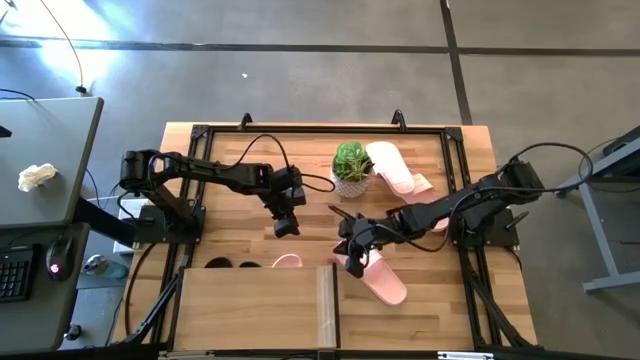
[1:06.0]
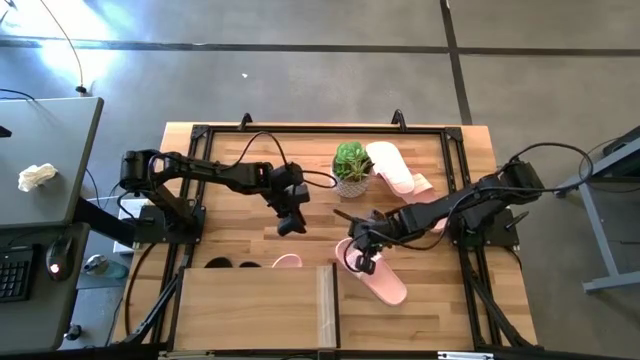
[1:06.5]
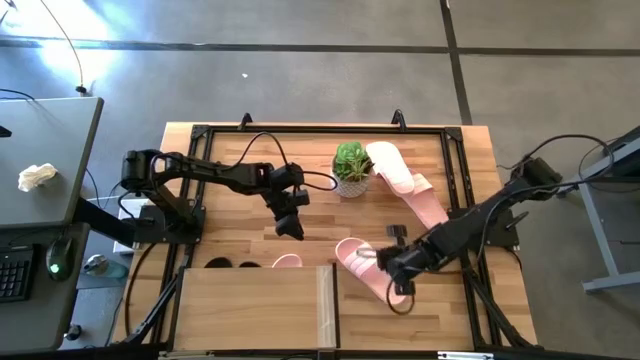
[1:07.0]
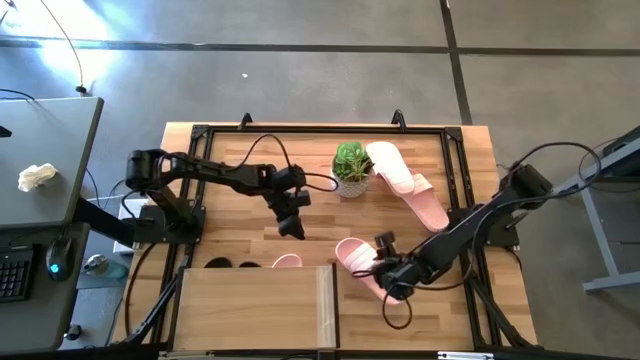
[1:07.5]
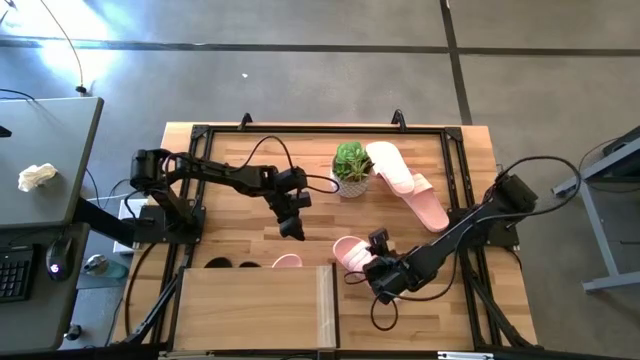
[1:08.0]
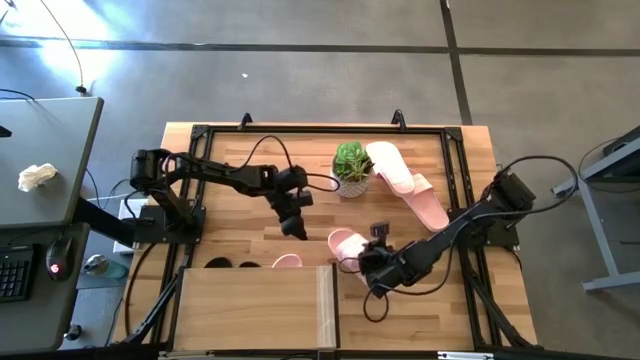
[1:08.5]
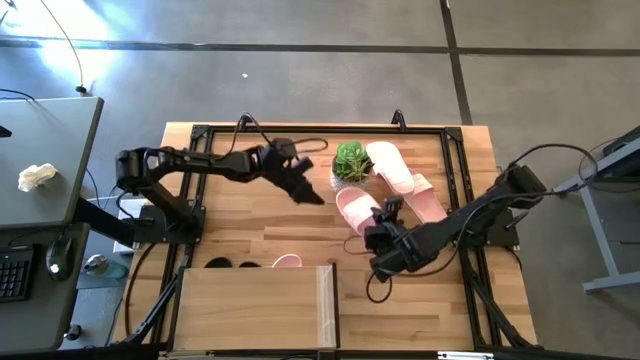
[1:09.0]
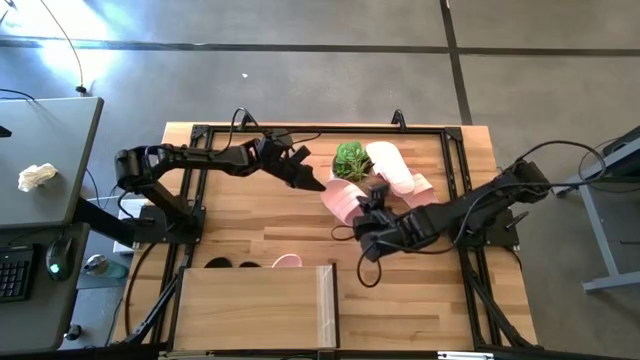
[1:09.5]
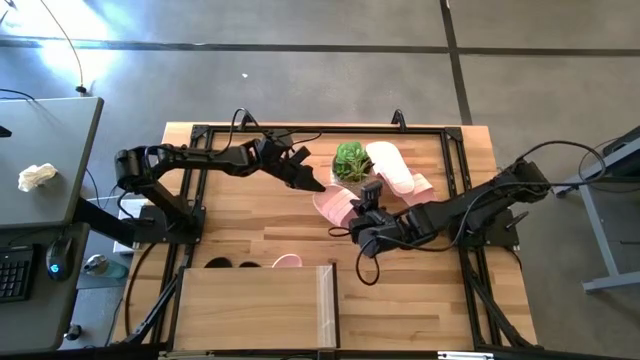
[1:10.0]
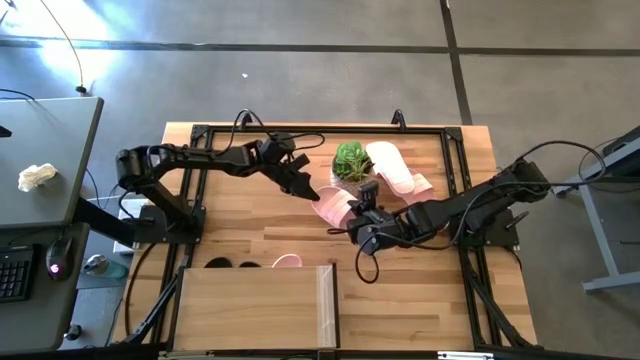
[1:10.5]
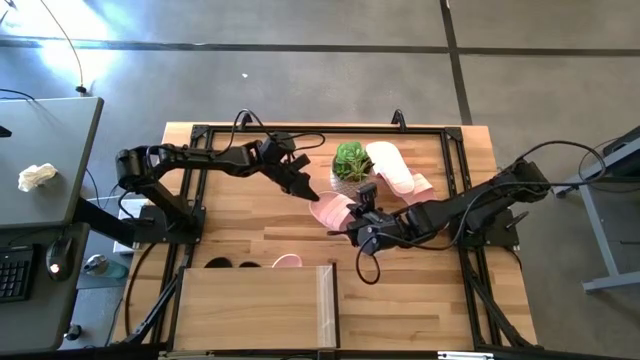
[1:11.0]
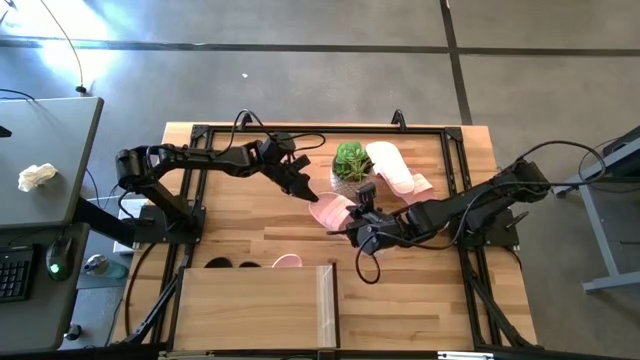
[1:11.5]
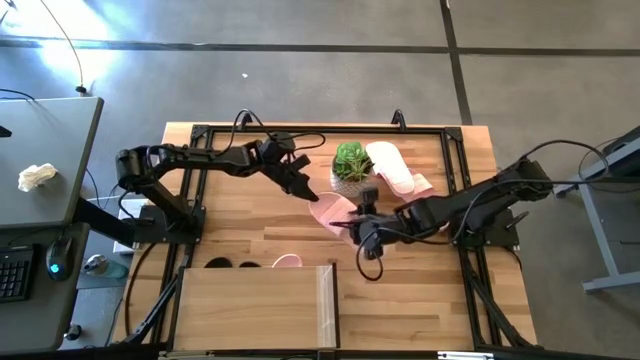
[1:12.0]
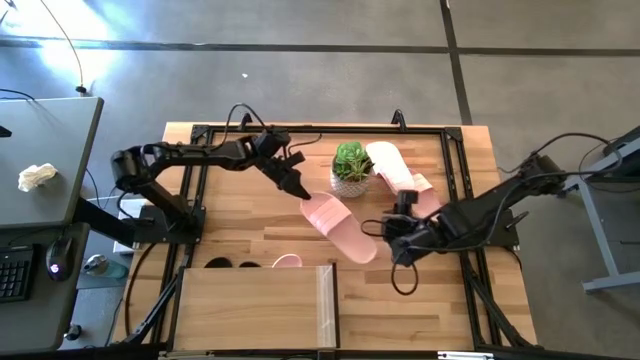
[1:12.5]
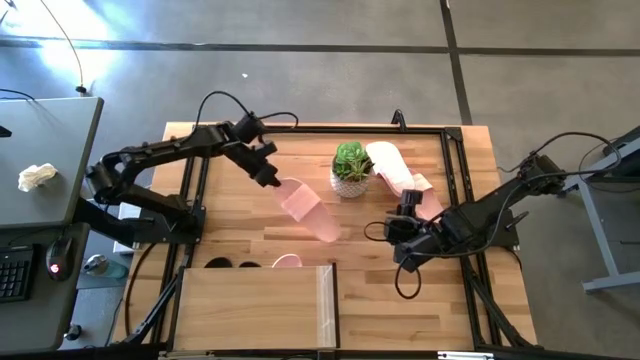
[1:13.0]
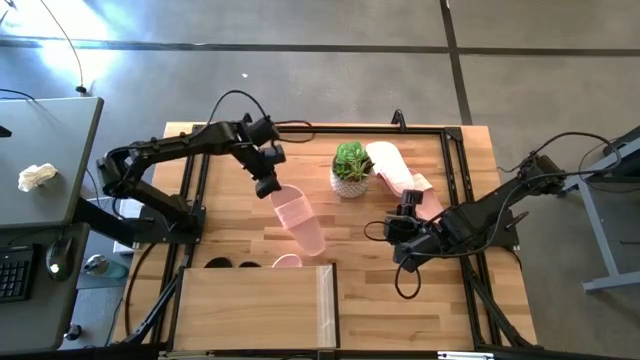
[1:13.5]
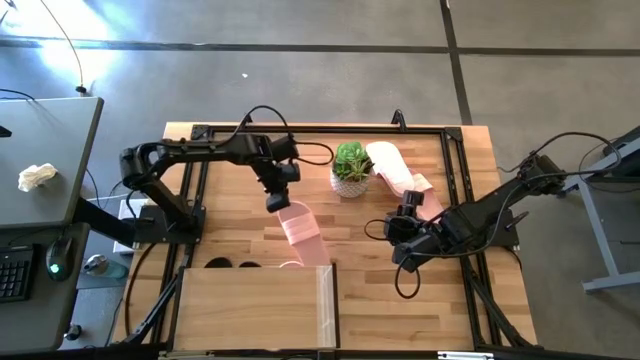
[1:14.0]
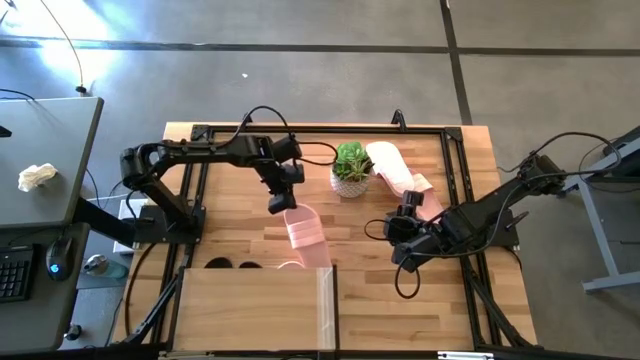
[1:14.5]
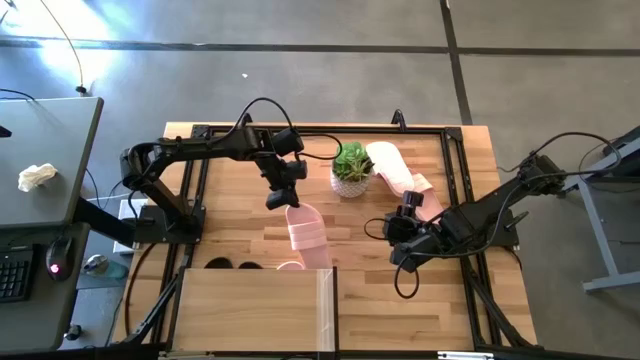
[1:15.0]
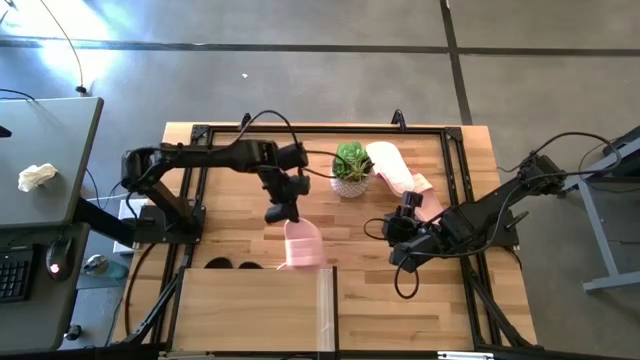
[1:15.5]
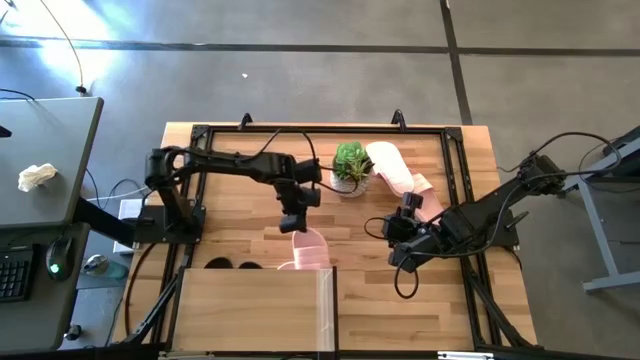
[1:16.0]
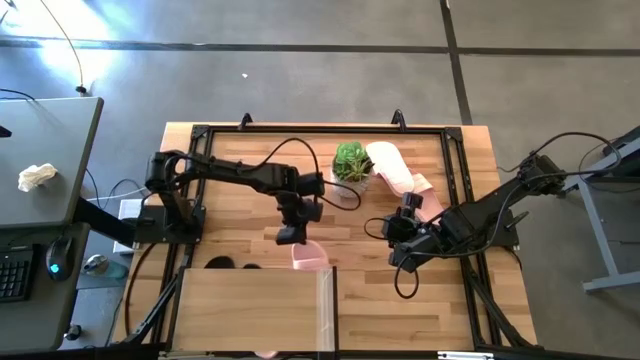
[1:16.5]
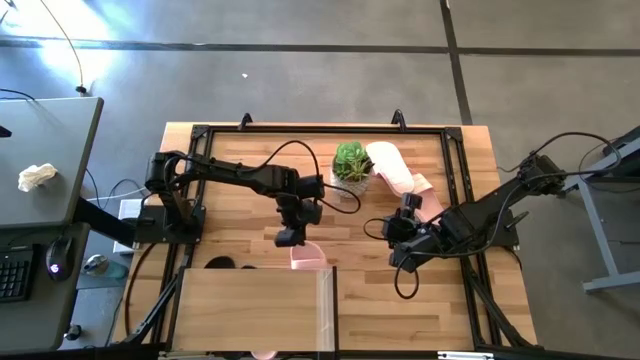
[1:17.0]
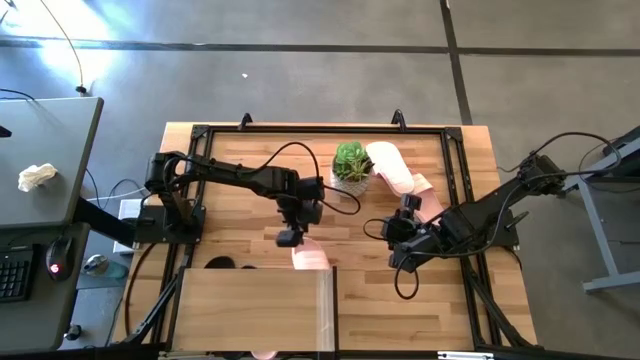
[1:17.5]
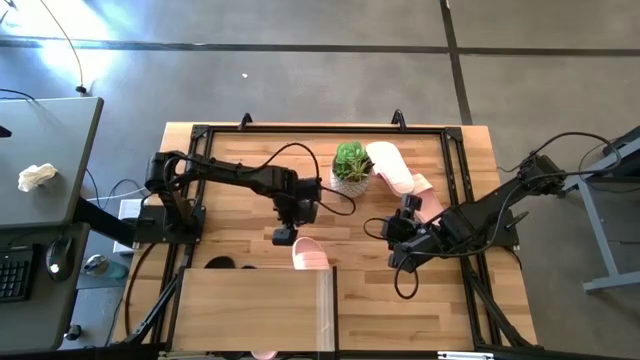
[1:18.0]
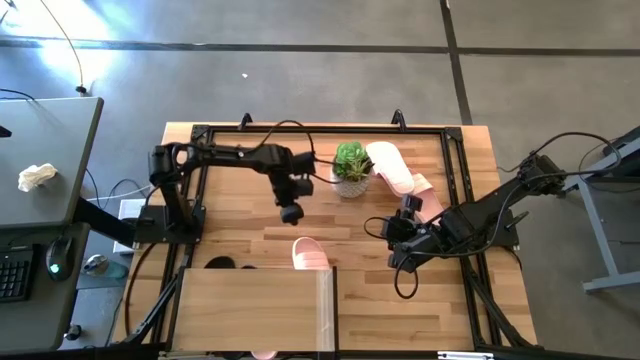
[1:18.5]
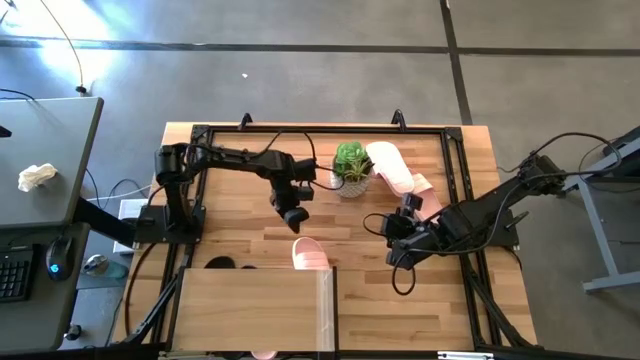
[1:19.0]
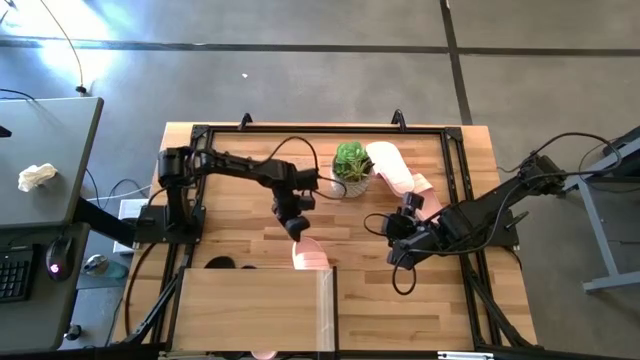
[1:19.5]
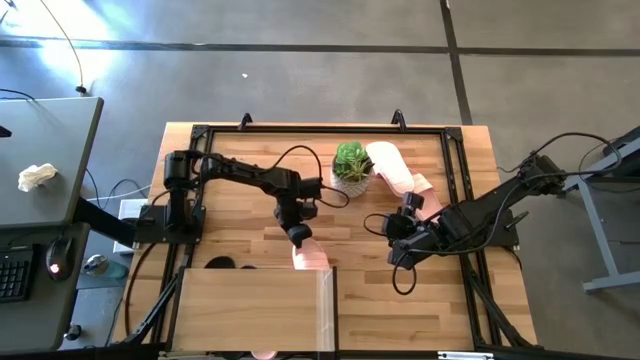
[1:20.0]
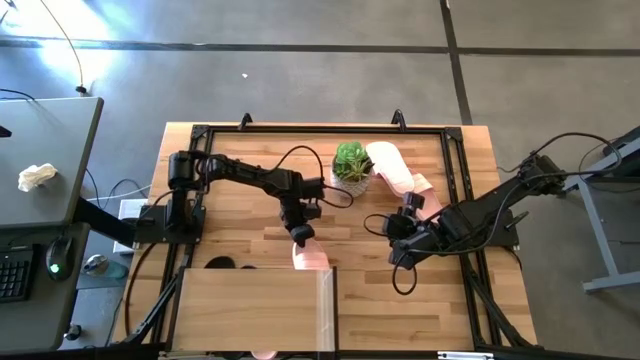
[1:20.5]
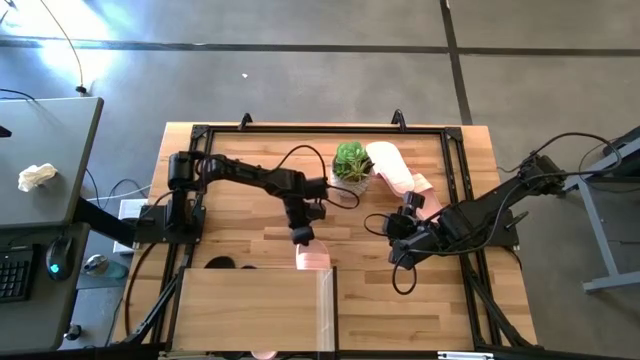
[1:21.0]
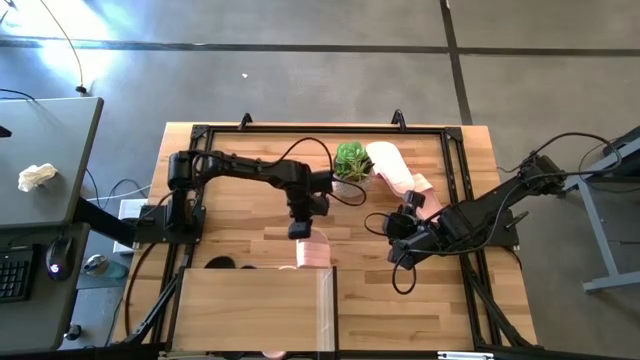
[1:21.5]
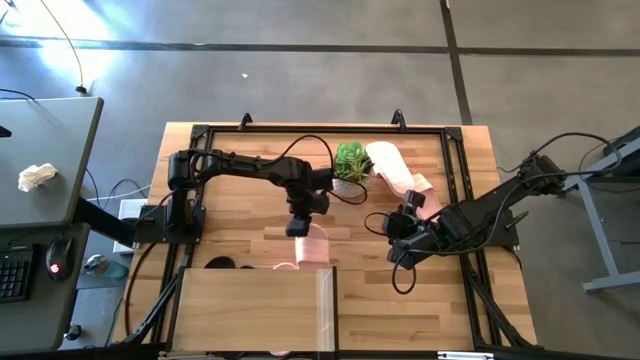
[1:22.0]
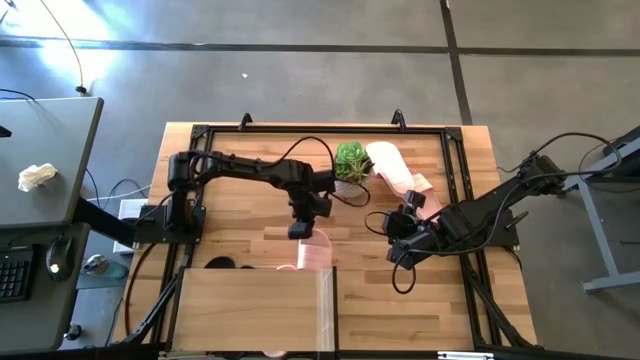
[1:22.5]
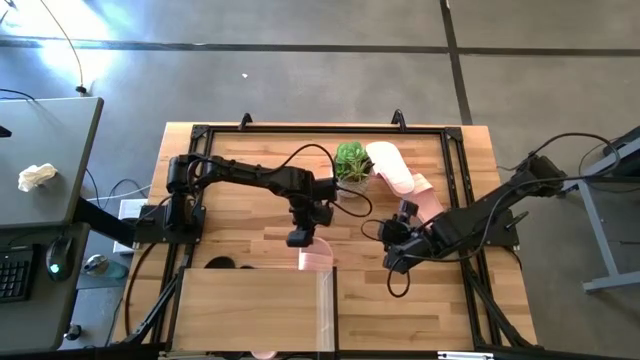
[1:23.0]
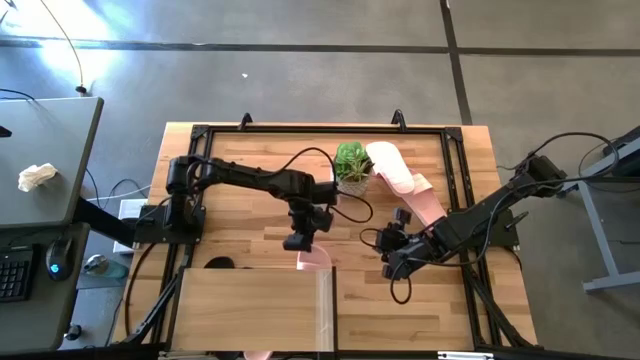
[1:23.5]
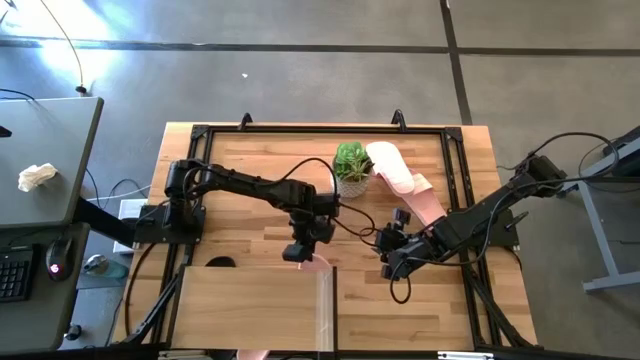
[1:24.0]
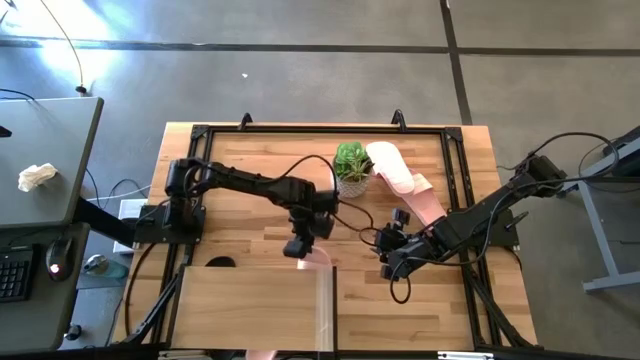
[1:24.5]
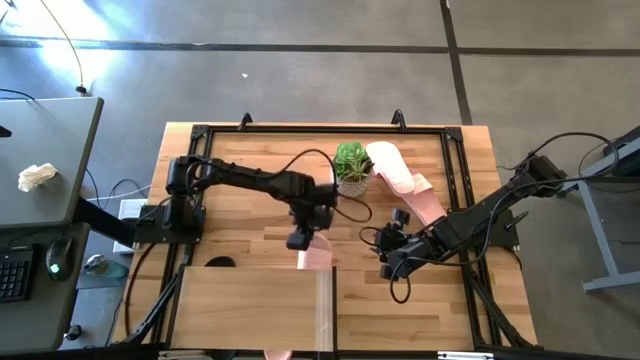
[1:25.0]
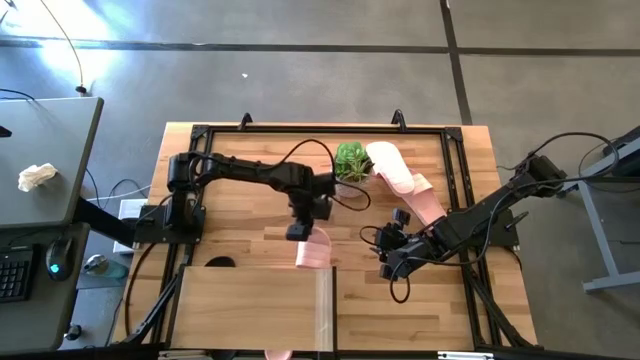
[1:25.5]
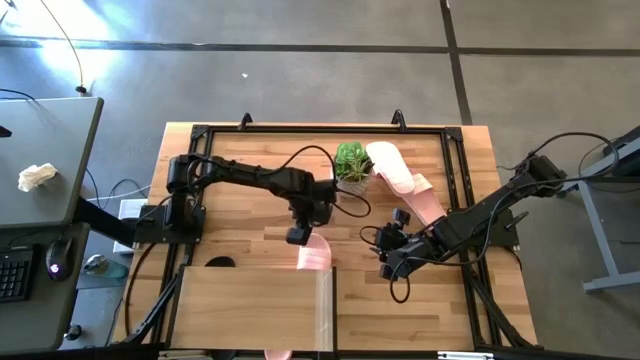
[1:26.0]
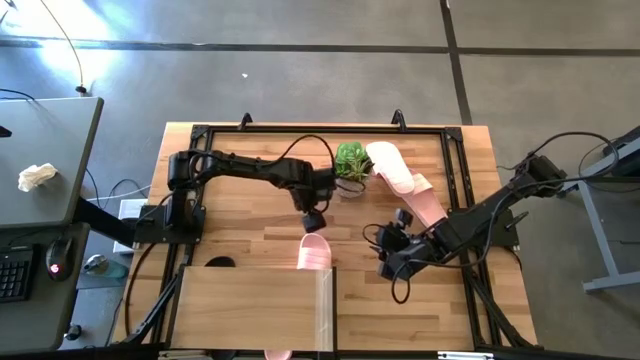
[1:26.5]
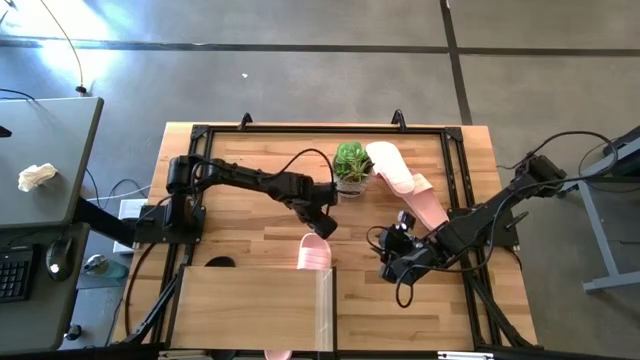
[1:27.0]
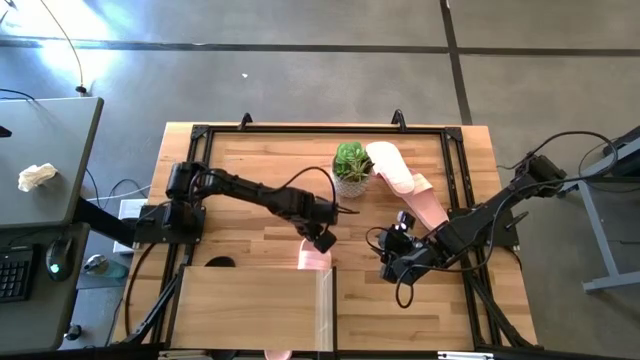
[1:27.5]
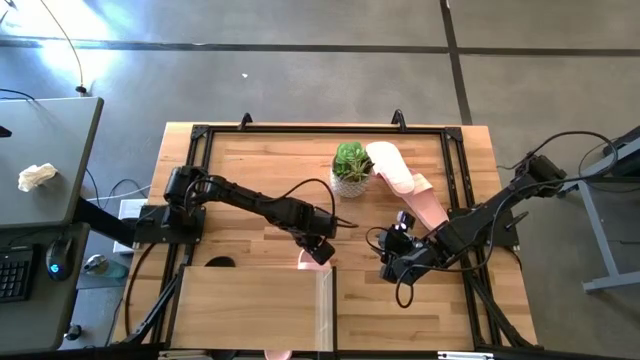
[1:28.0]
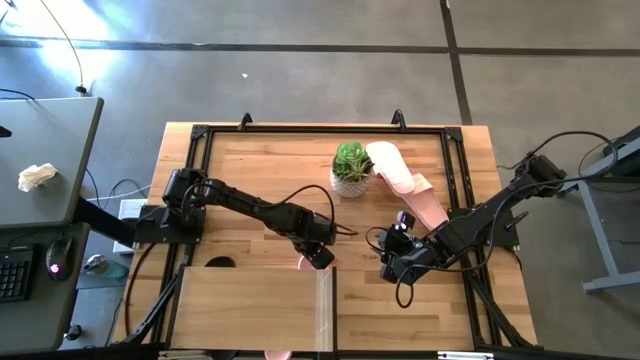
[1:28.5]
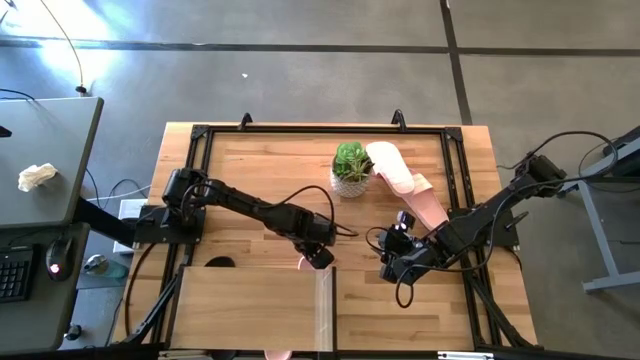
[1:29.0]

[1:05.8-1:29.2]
Task: Pick and place slides into the shelf
Put the pink slide under the shelf
